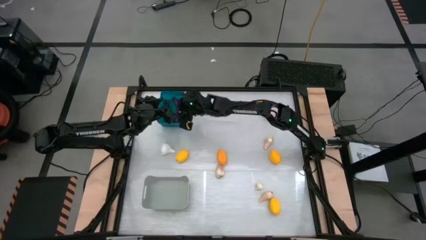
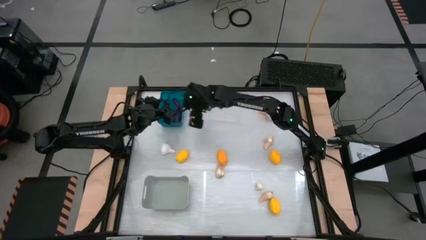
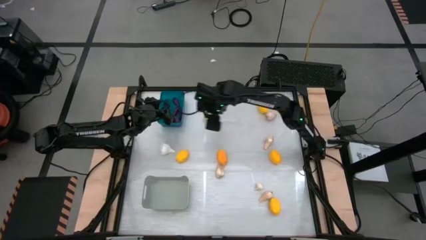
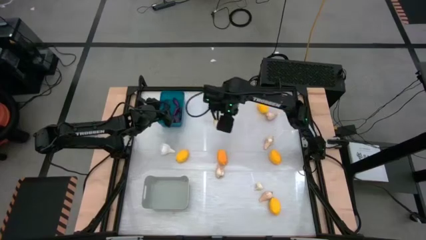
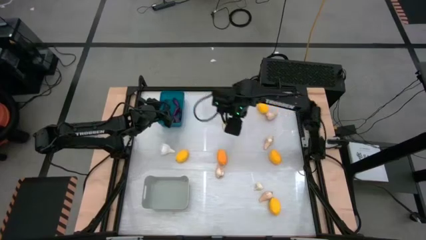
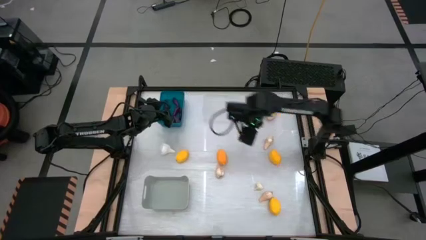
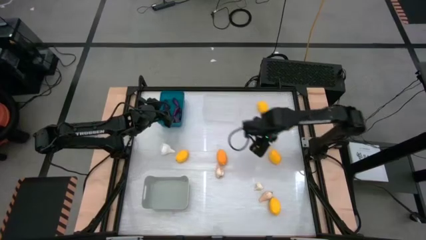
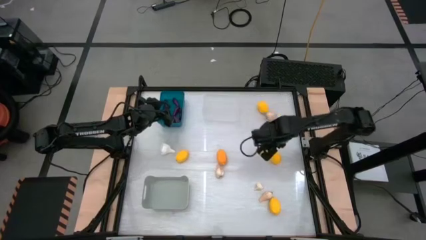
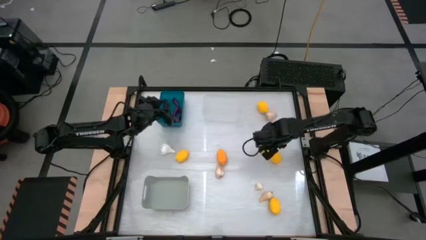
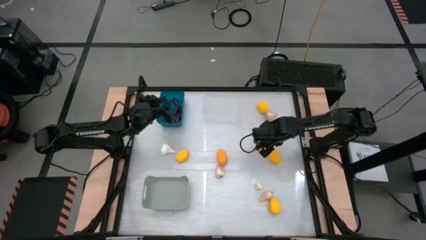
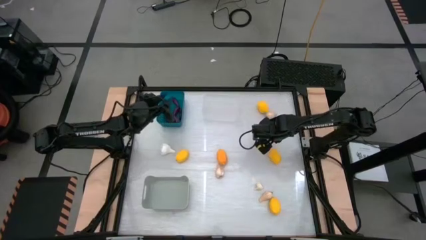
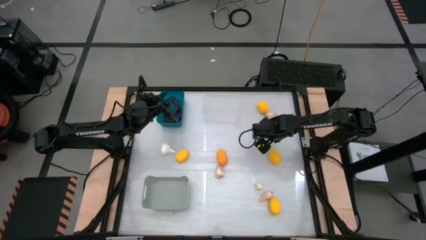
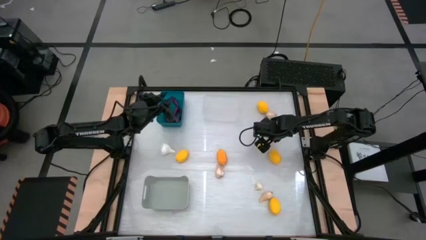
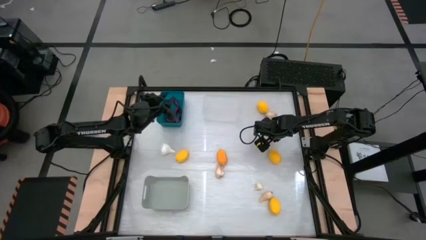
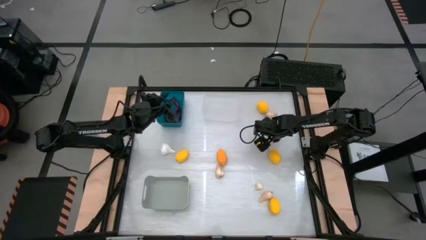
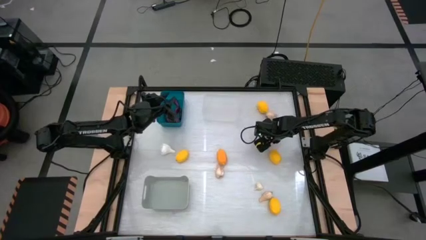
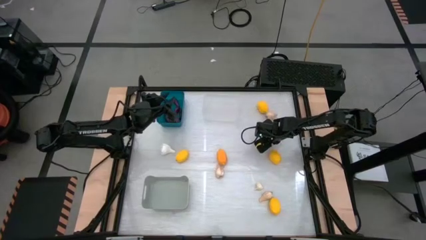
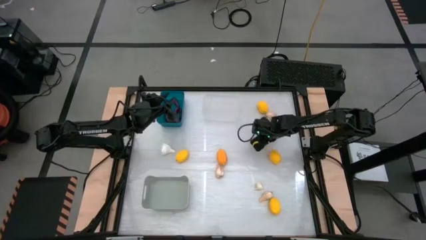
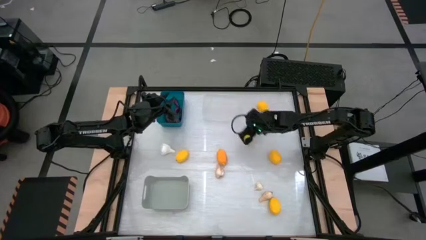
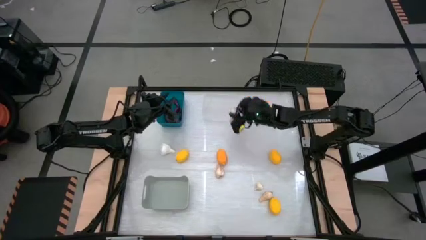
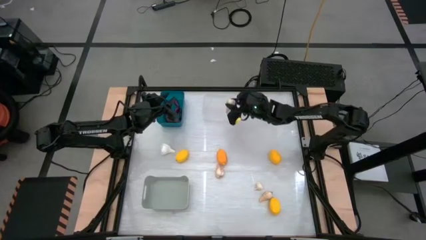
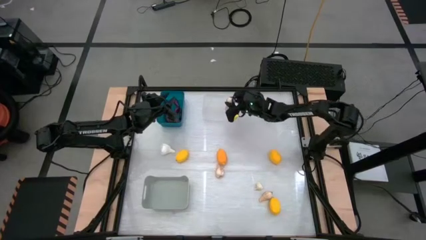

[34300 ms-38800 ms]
Task: Sort produce into baskets
Put the garlic into the transparent bin

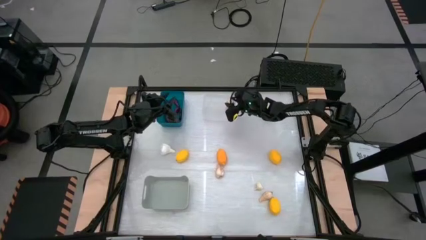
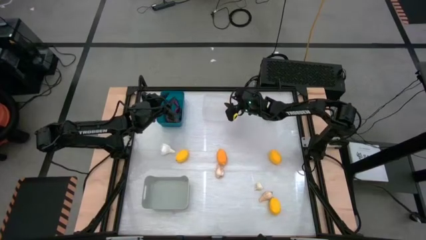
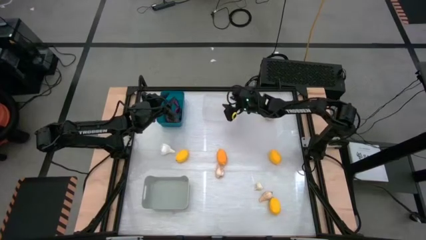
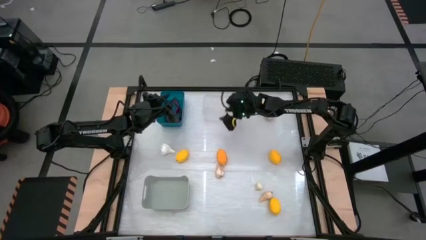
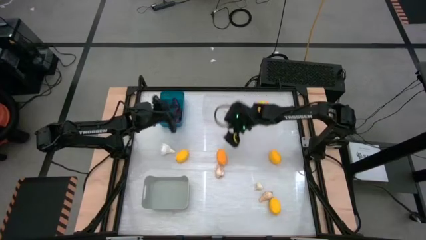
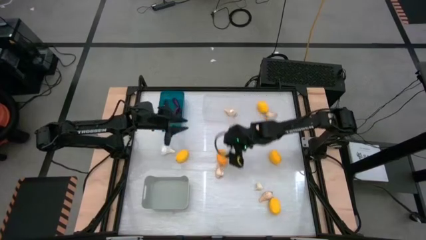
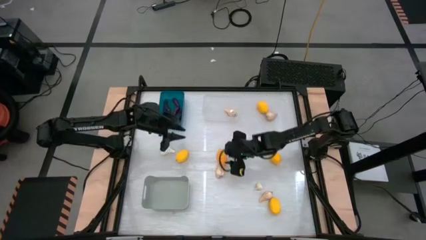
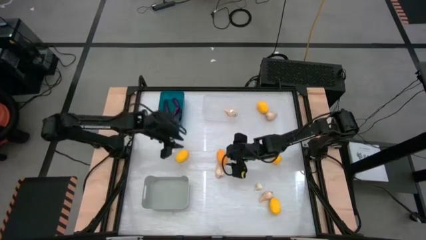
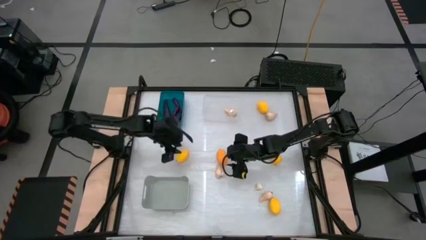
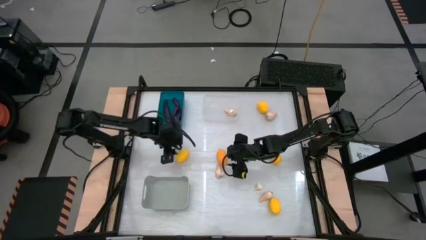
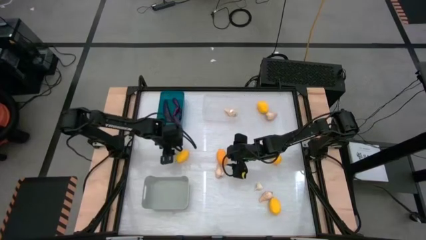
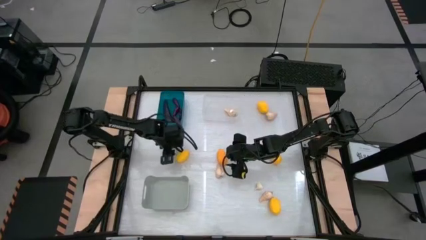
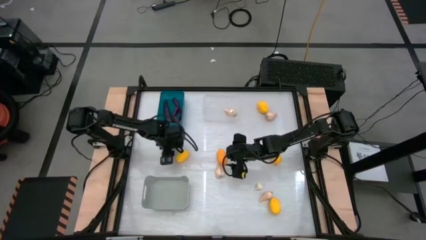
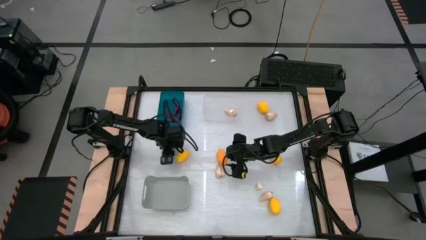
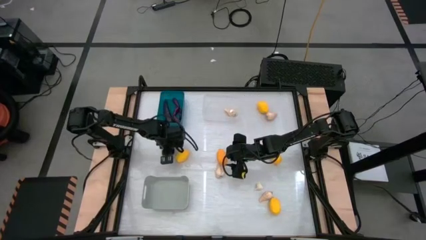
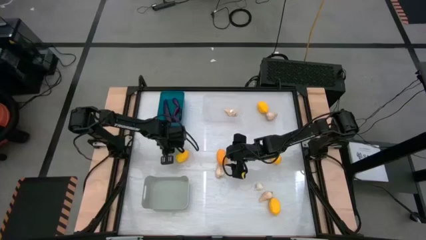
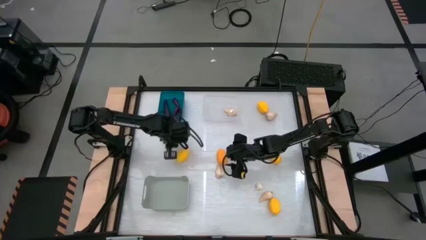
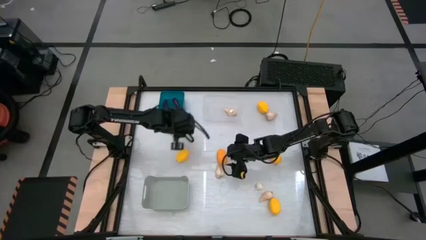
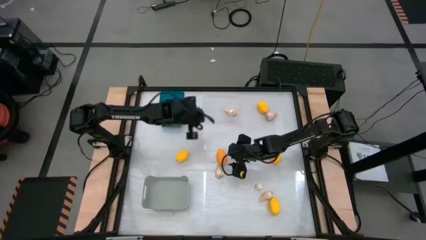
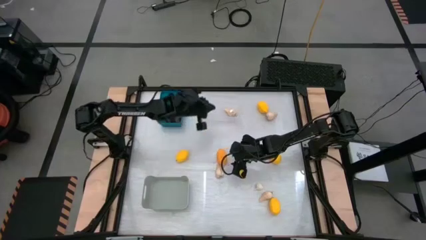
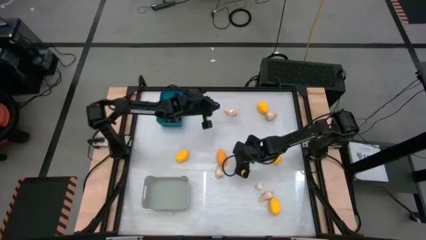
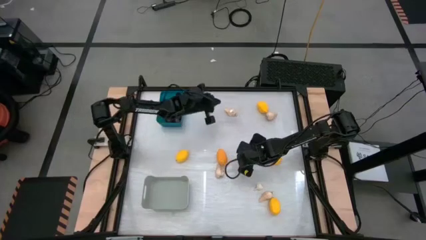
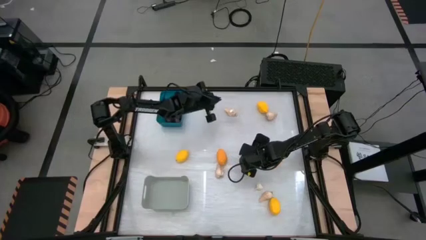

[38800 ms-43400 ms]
Put the garlic into the transparent bin

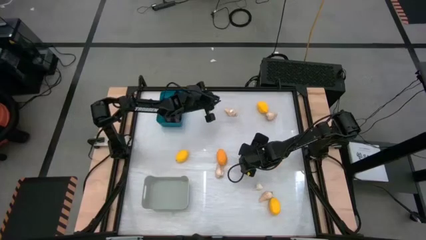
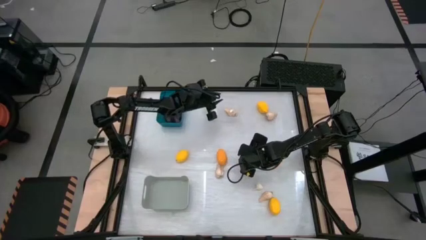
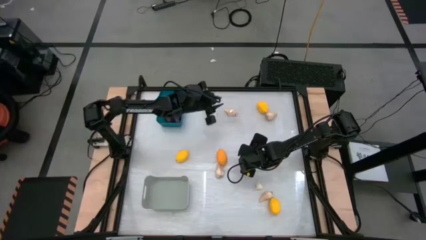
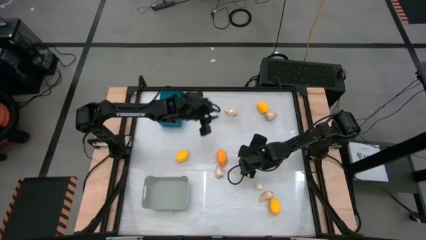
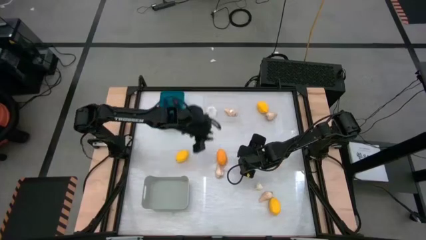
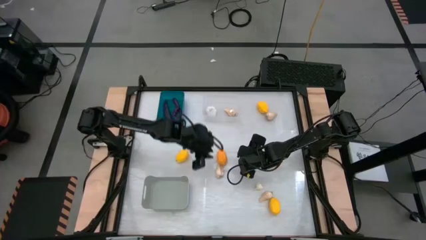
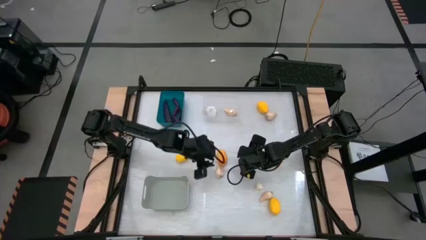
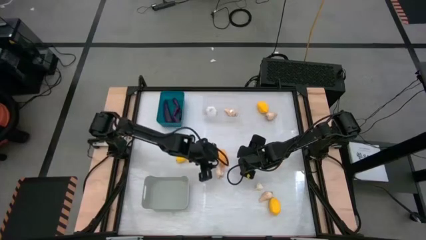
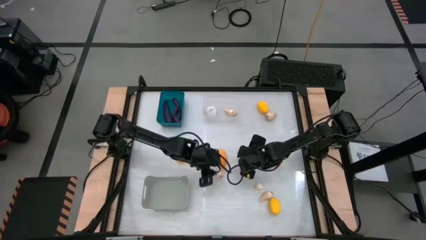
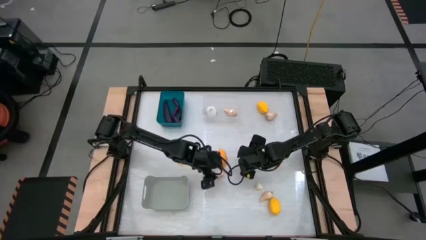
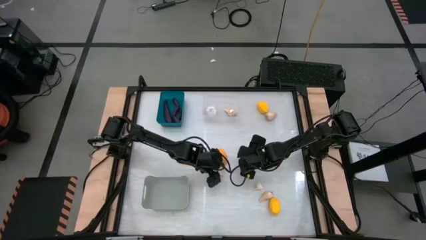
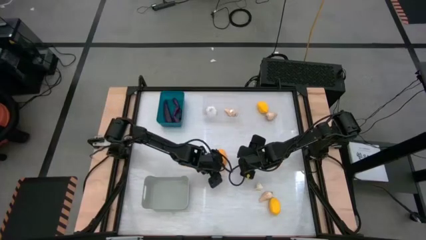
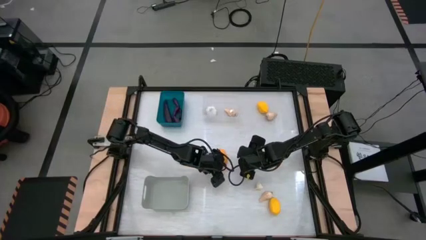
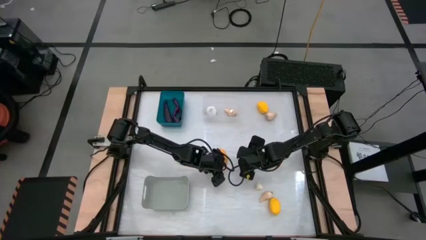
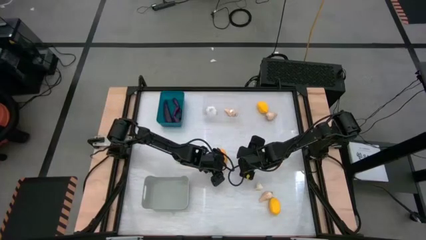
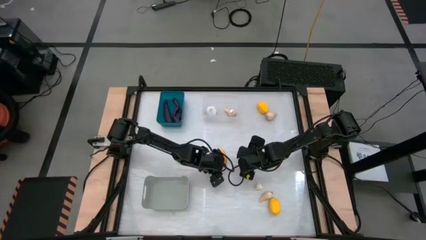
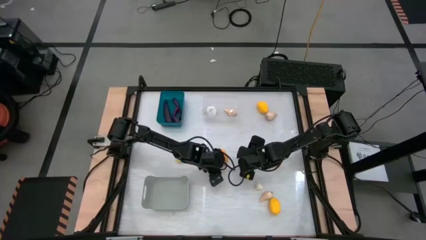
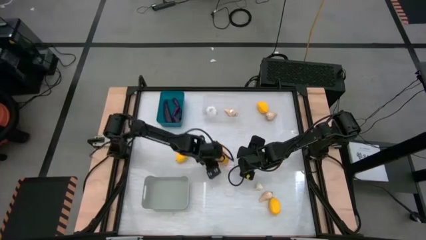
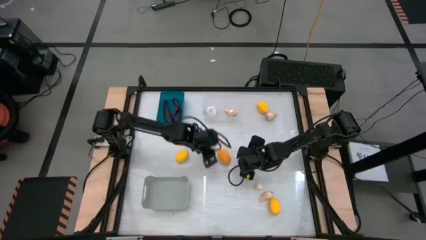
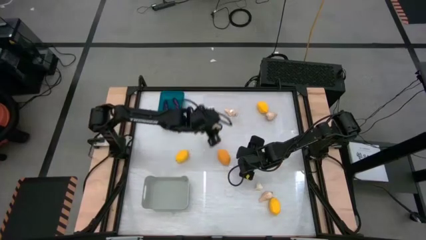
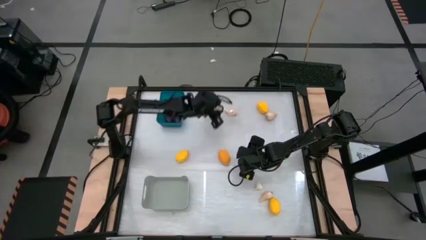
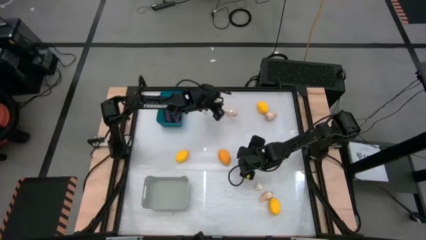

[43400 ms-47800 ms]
Put the garlic into the transparent bin

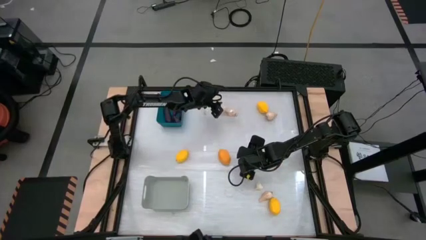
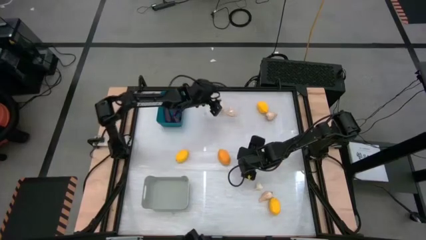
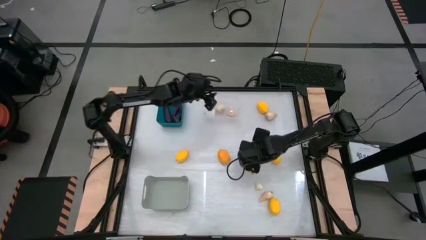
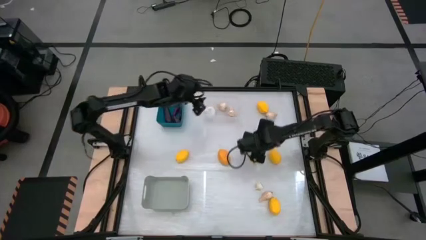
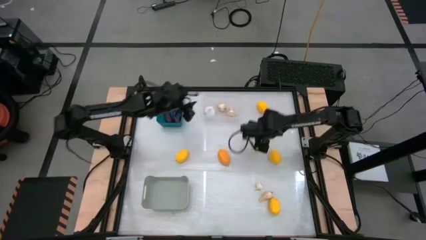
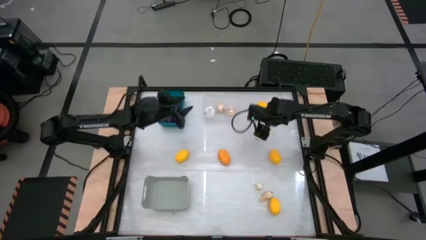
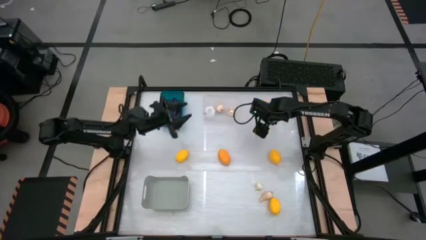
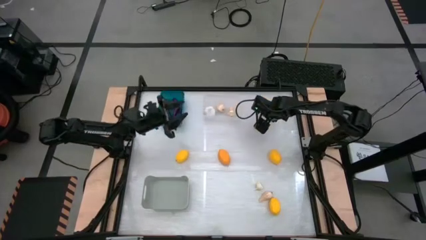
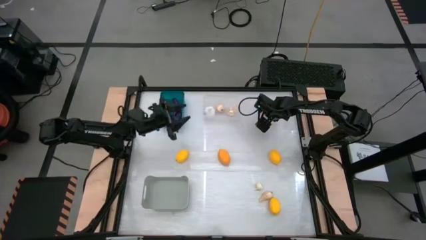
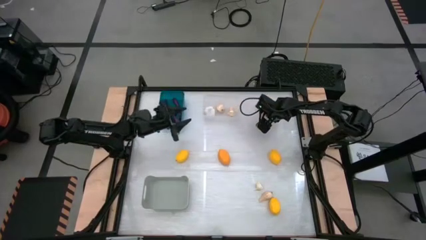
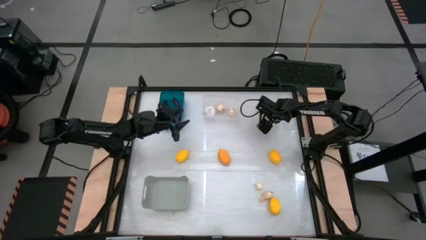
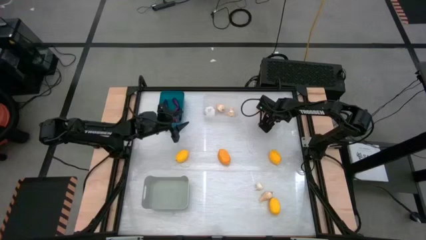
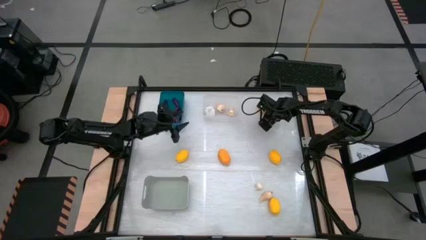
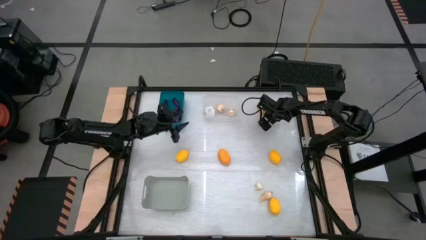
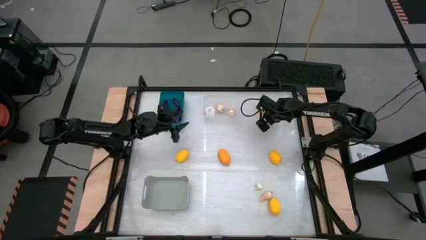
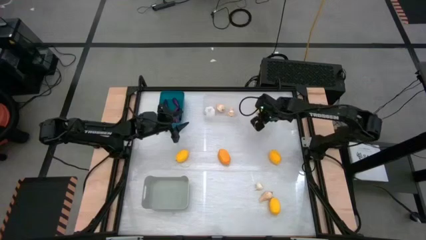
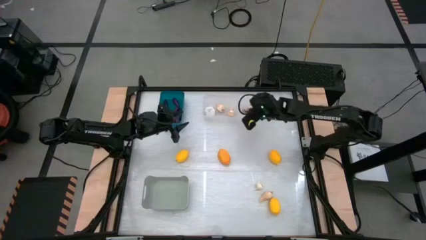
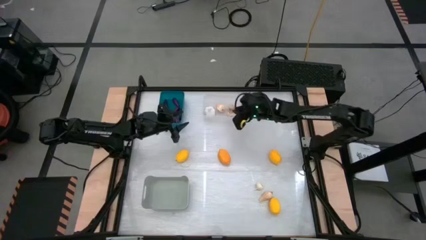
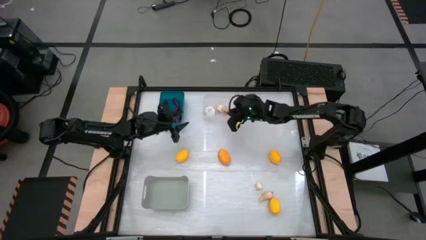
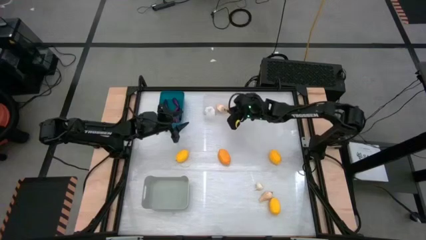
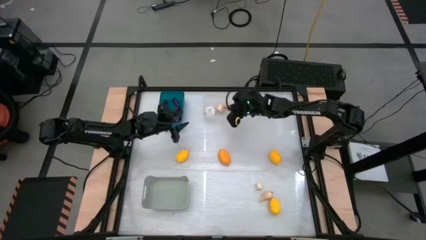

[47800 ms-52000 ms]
Put the garlic into the transparent bin
